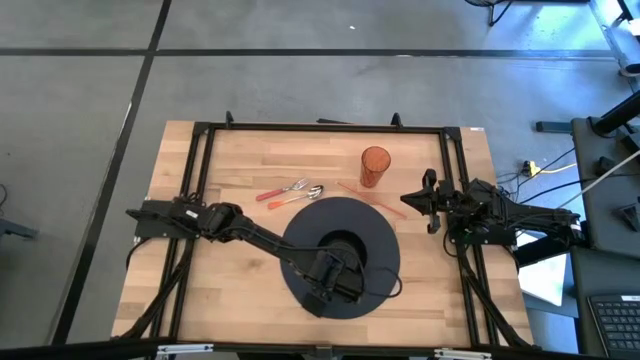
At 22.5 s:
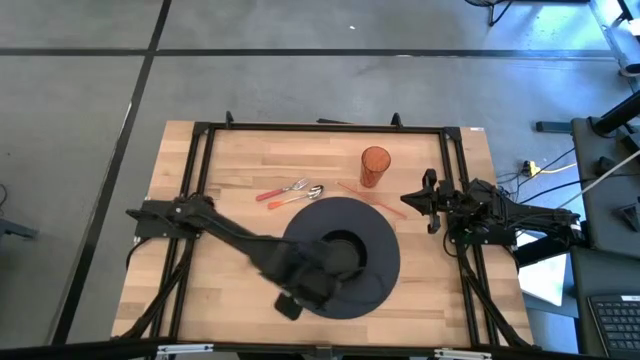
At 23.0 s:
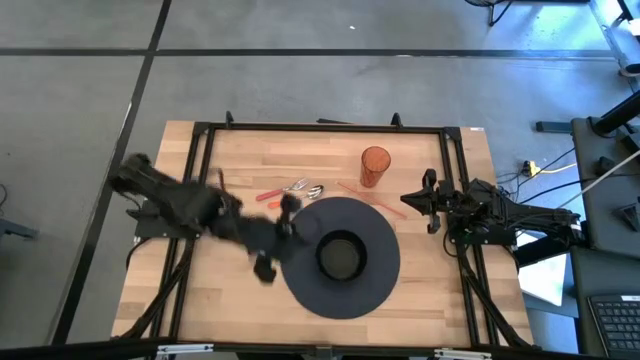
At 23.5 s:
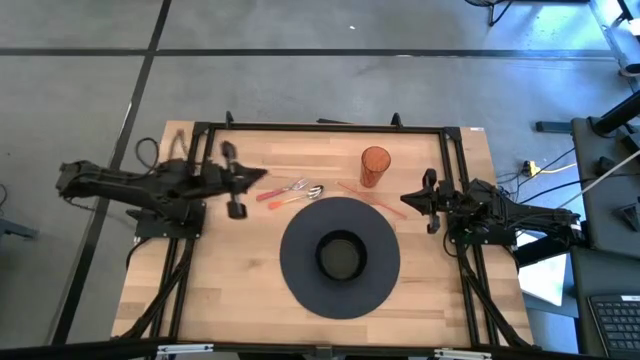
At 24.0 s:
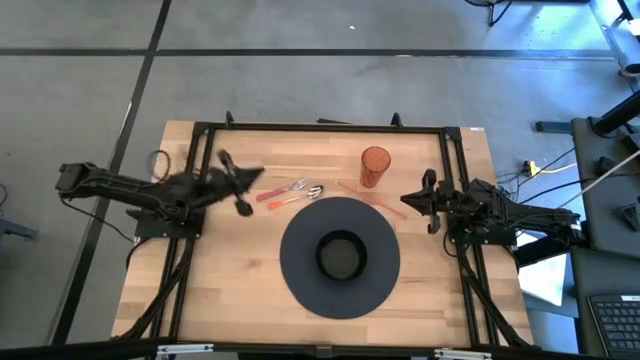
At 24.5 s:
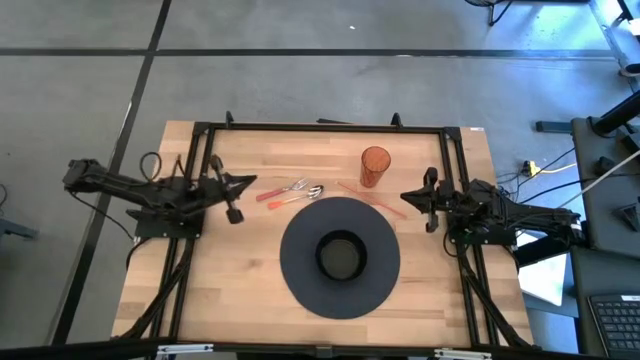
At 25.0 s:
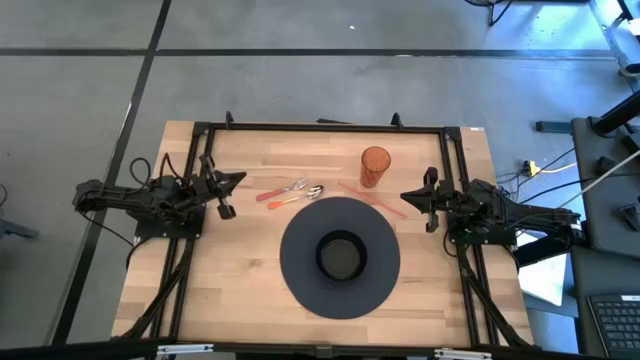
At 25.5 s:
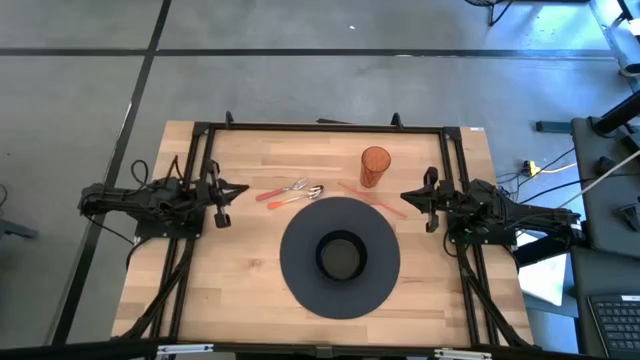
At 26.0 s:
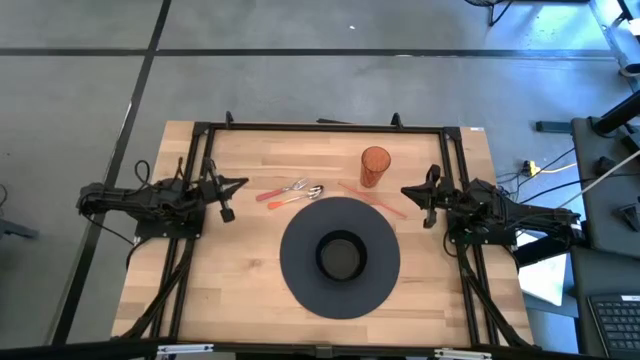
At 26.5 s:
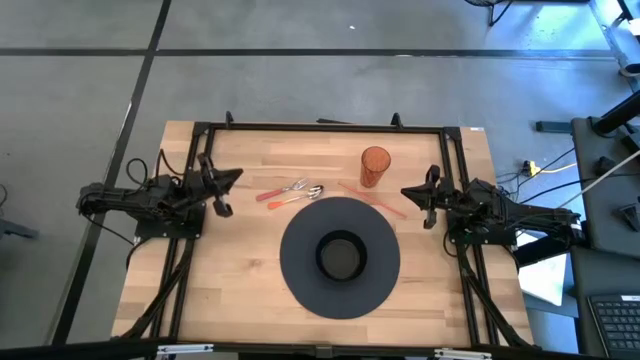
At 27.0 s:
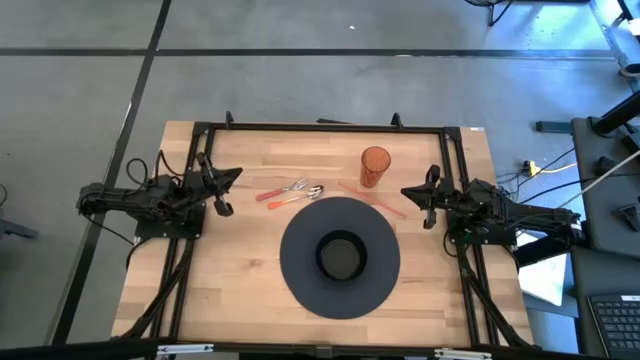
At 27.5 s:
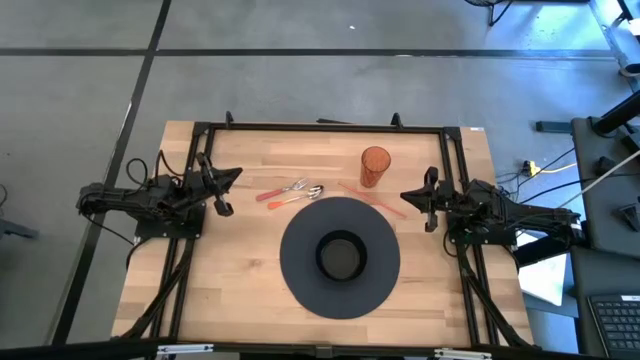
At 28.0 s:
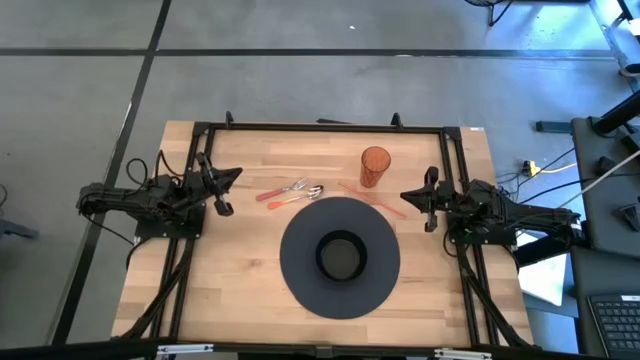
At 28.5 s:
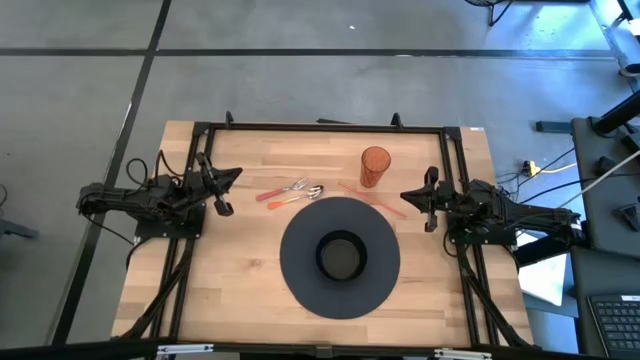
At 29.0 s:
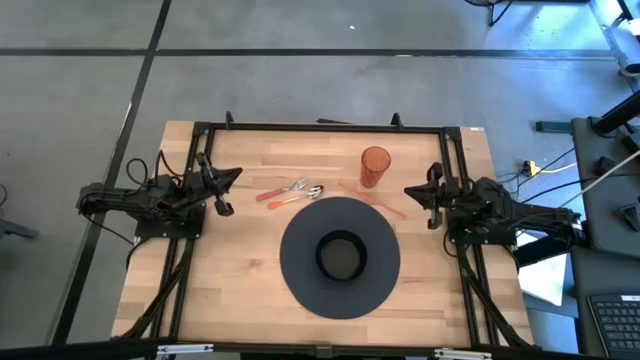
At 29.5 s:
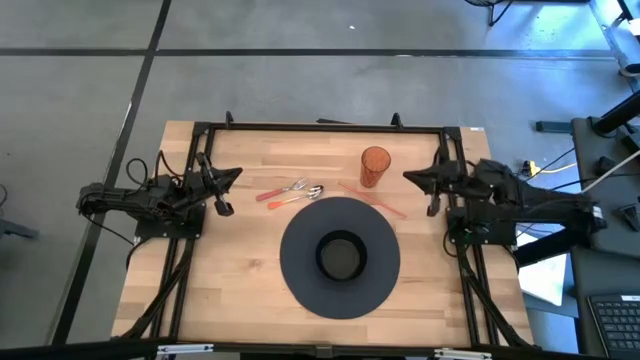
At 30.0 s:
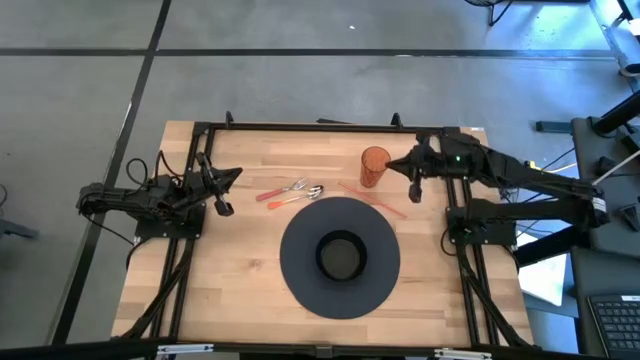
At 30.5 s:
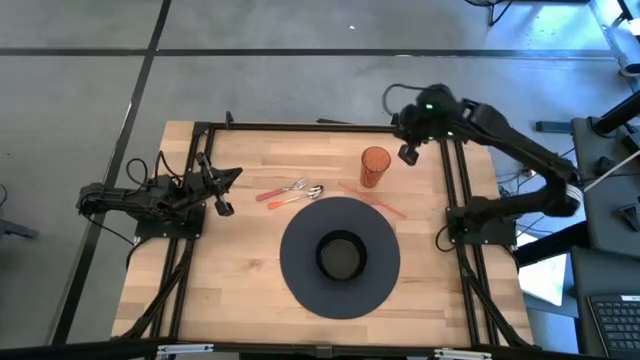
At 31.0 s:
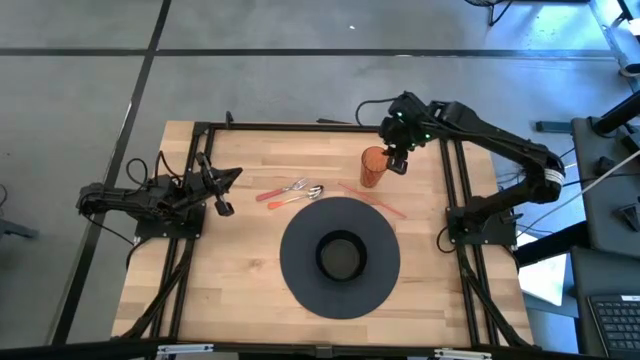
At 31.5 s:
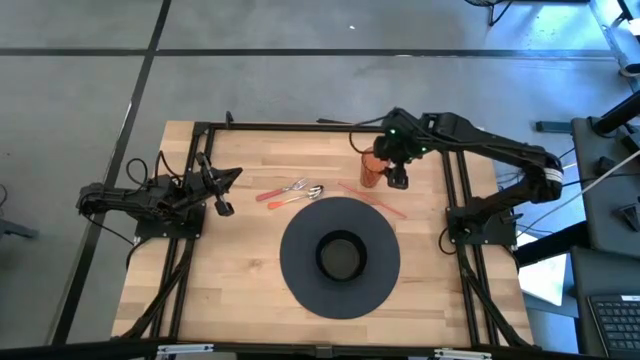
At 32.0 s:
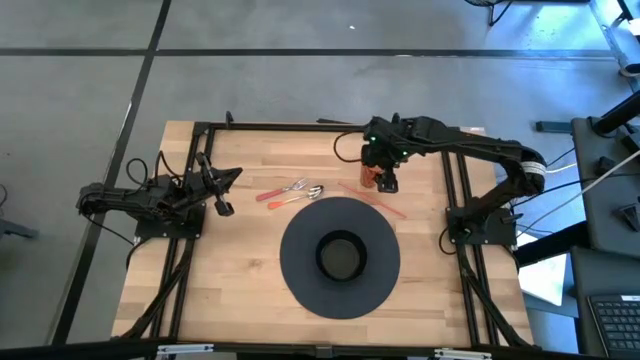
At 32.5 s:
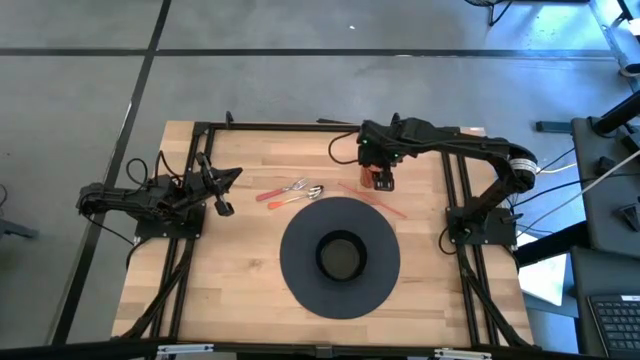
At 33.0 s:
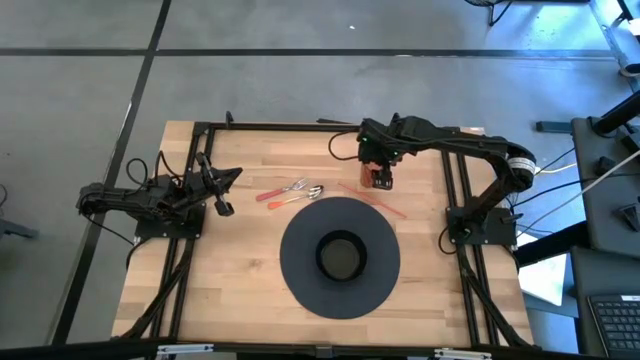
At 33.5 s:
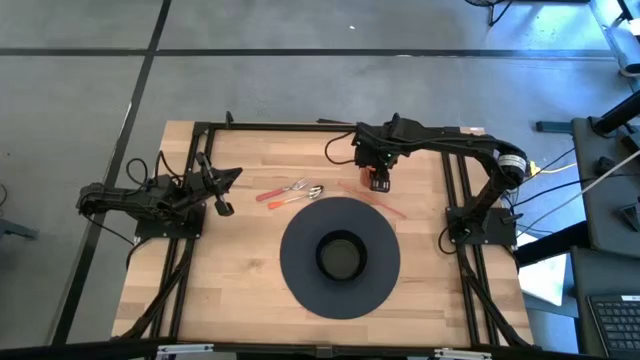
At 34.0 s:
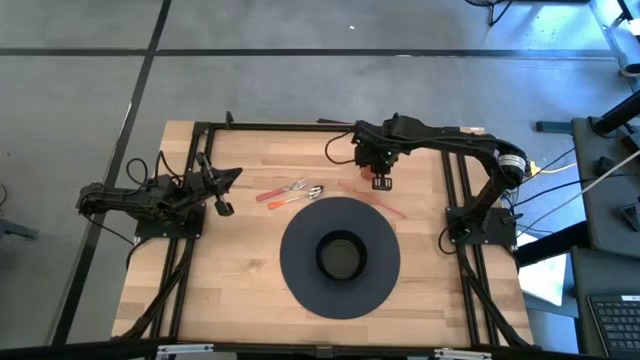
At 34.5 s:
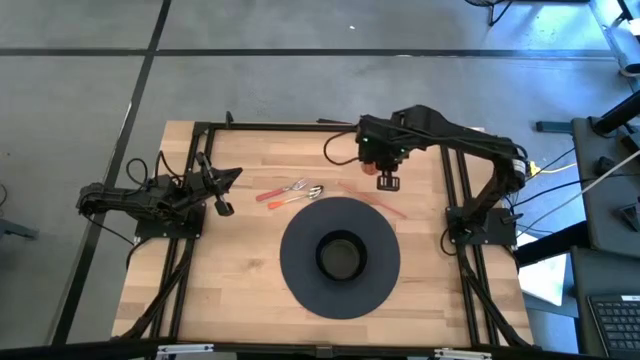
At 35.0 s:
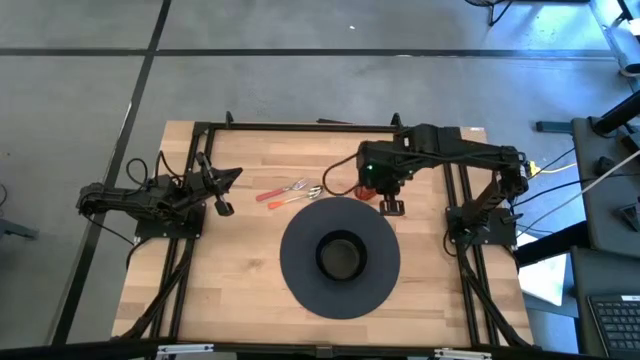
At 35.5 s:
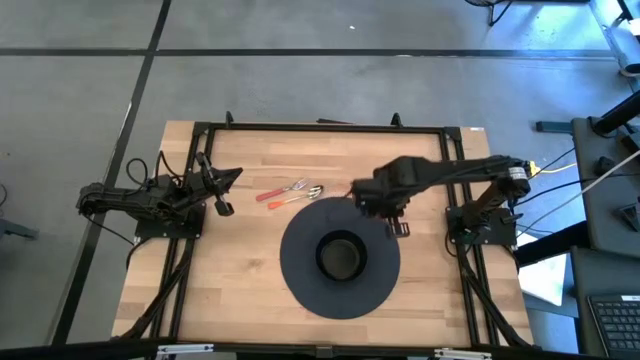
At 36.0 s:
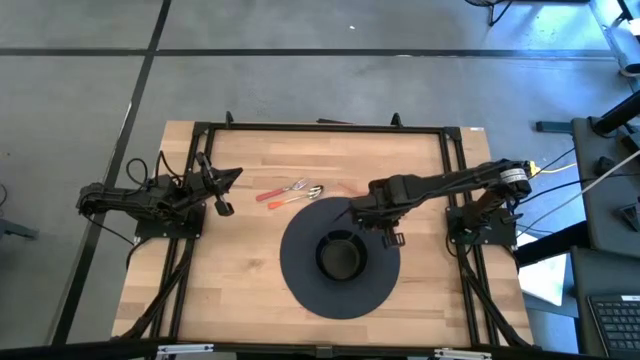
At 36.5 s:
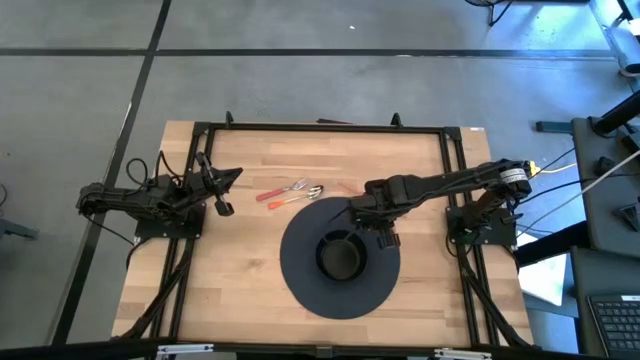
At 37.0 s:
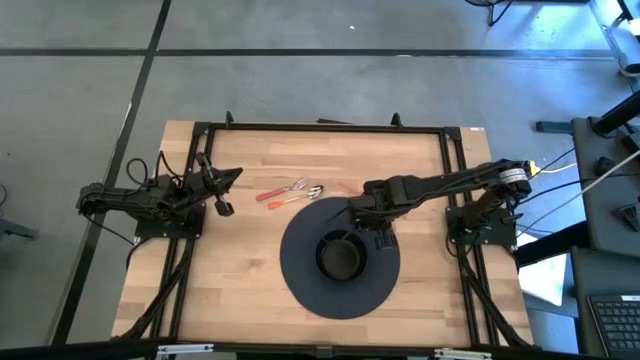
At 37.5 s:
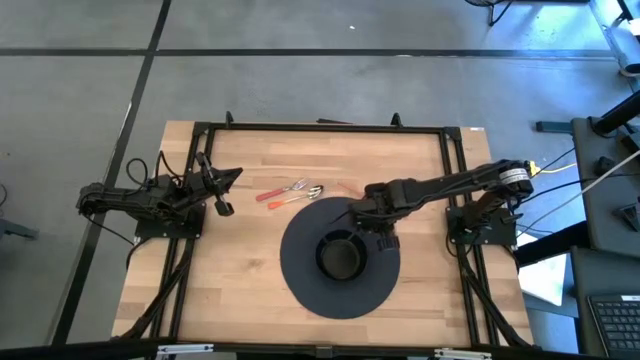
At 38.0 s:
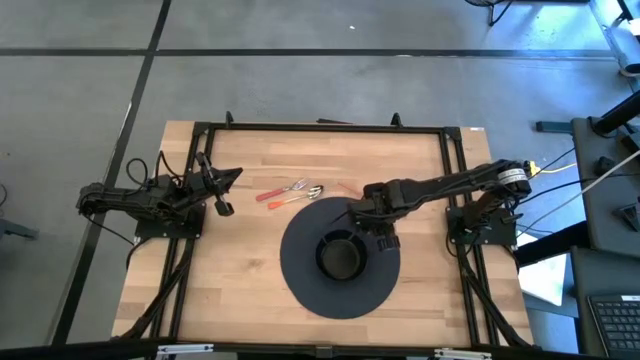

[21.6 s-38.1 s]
Task: Pick & Place Utensil
Put the orange cup on the black placemat to the top right of the black bowl

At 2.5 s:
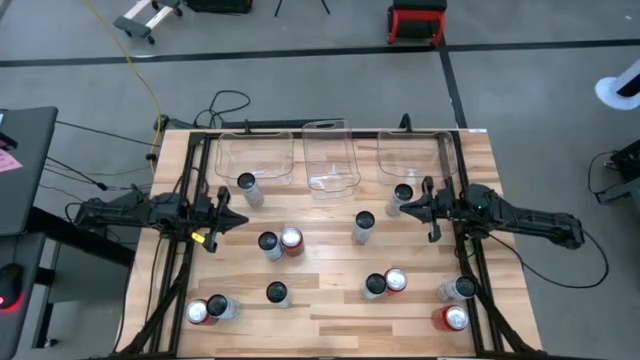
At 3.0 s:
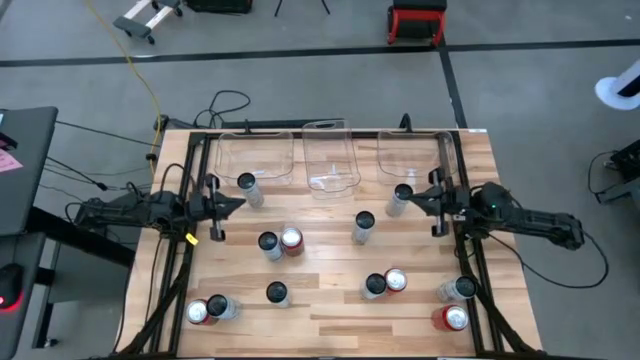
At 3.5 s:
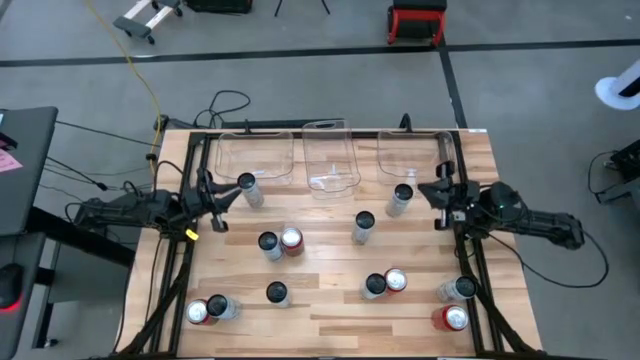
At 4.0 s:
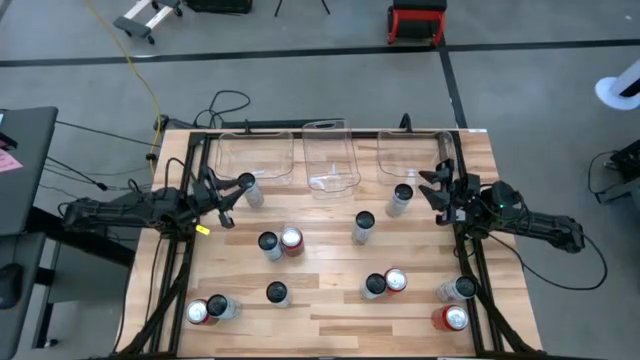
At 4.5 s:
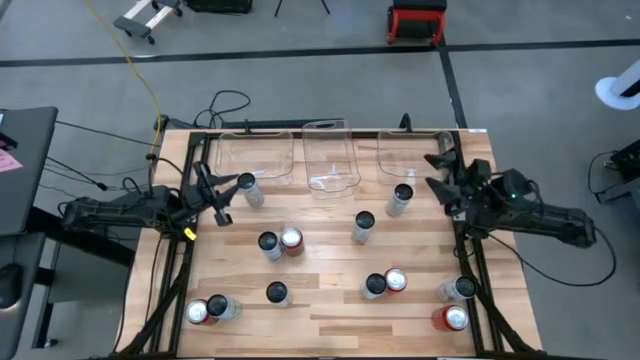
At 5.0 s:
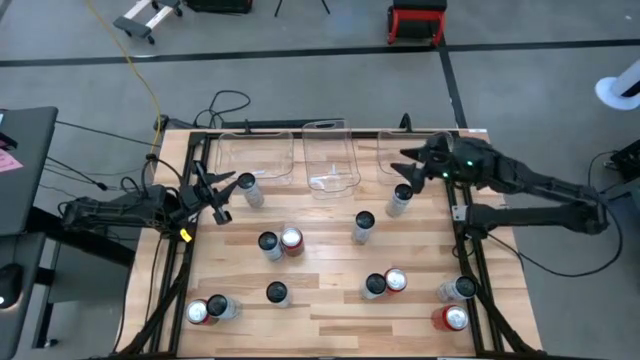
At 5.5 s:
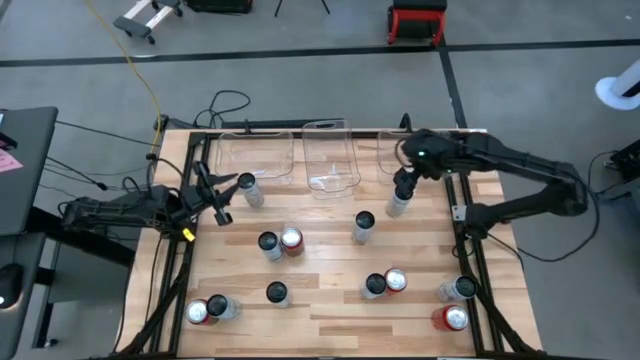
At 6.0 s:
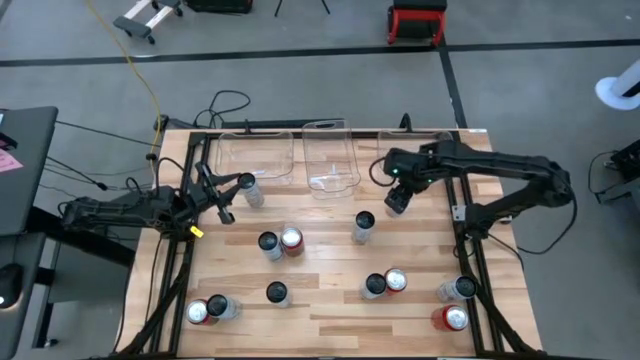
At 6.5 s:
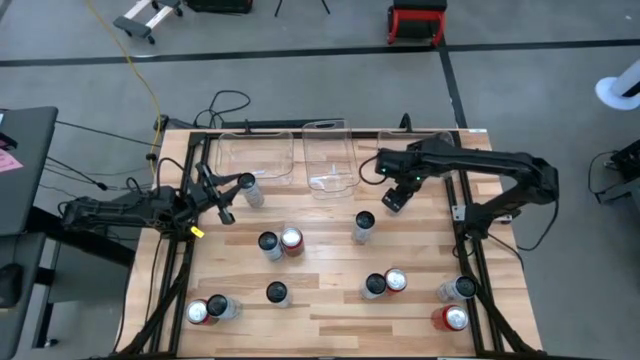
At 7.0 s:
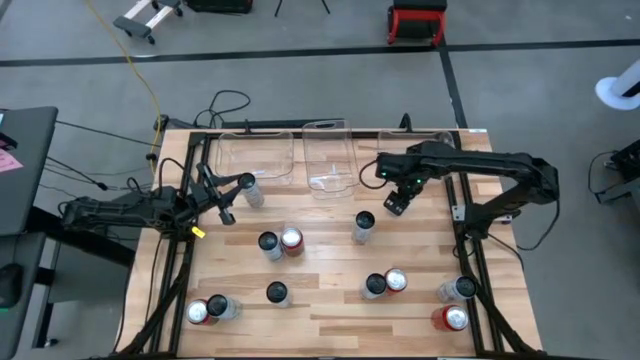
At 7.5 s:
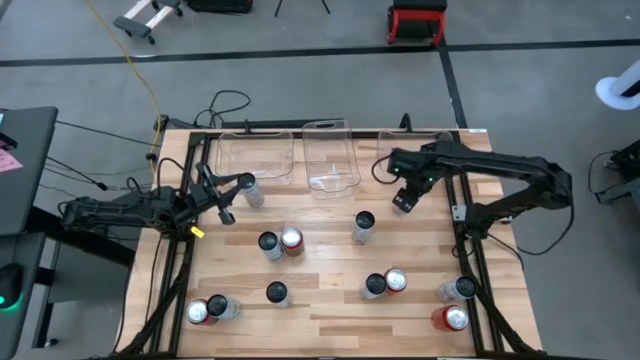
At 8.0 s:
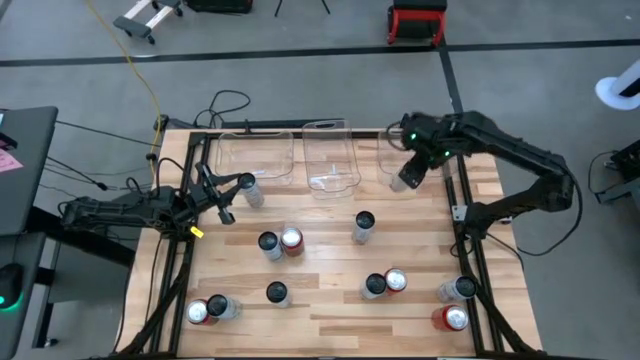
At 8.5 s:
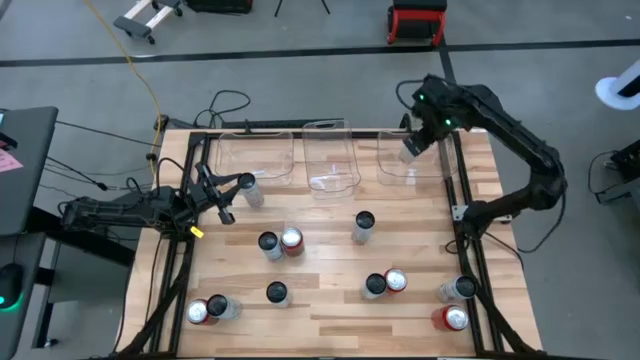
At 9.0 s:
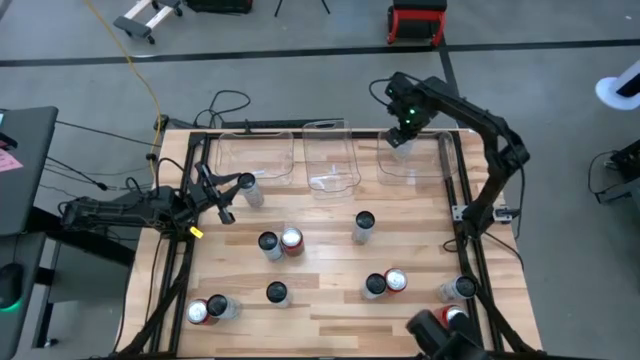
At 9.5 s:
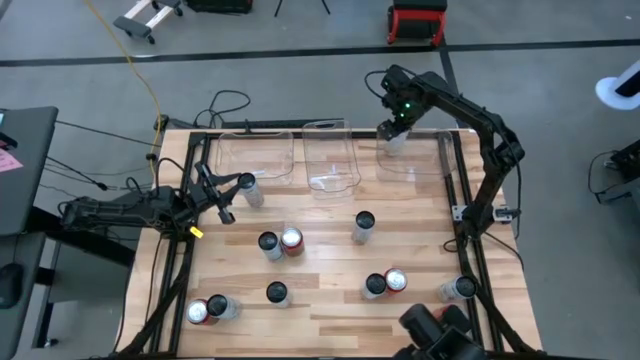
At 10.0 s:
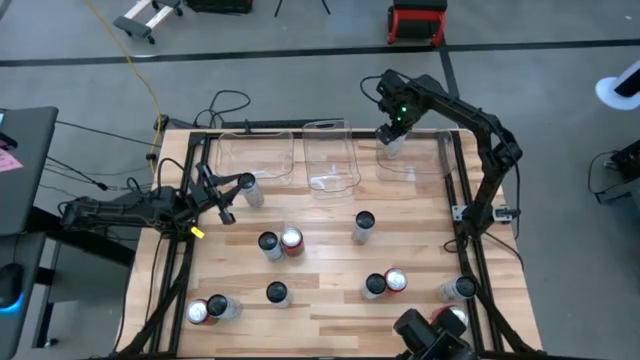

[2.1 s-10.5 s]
Task: Sort soda cans
Put the white-yellow soda can into the right transparent bin
